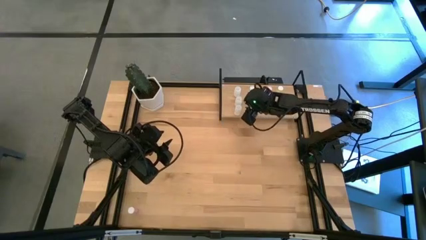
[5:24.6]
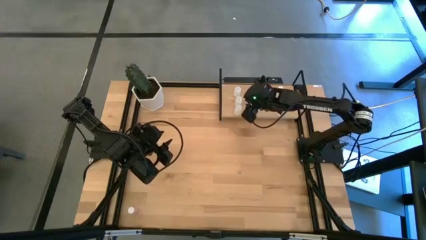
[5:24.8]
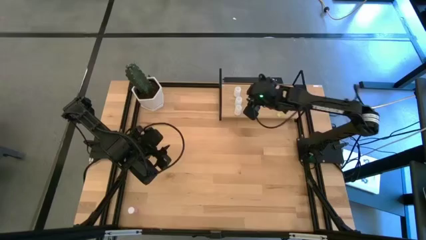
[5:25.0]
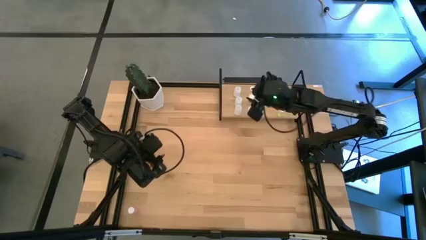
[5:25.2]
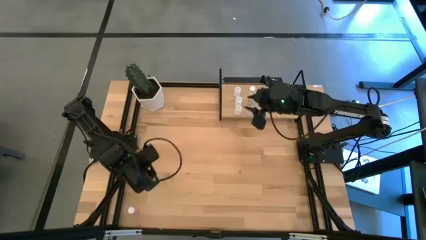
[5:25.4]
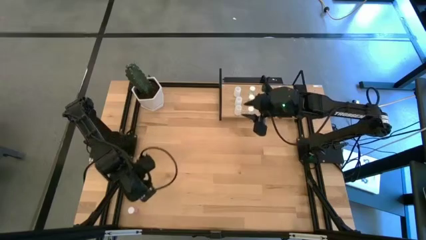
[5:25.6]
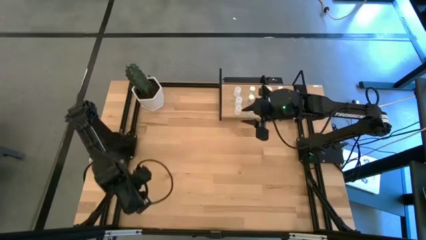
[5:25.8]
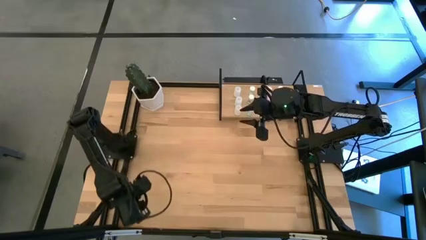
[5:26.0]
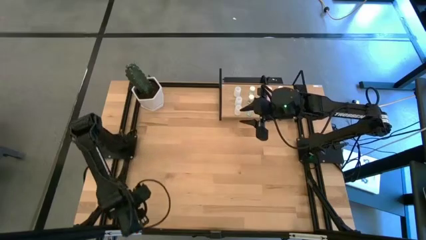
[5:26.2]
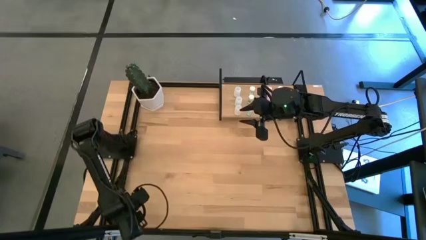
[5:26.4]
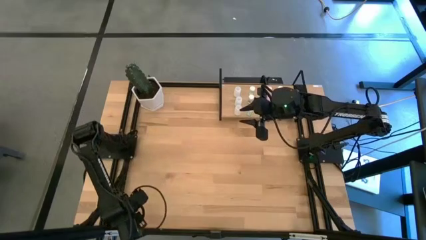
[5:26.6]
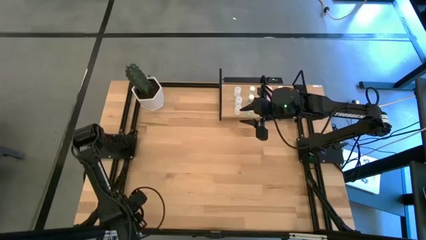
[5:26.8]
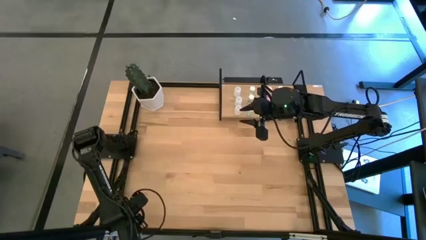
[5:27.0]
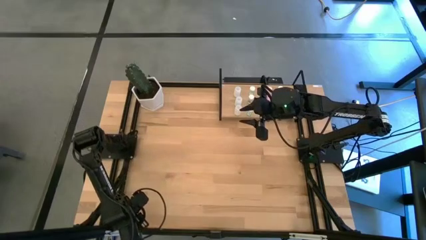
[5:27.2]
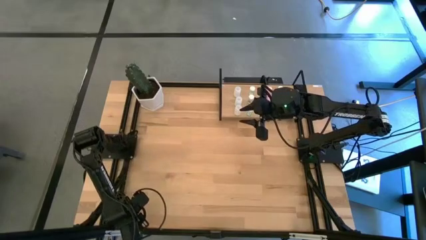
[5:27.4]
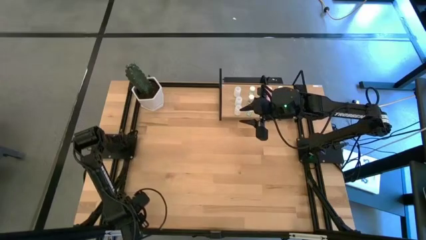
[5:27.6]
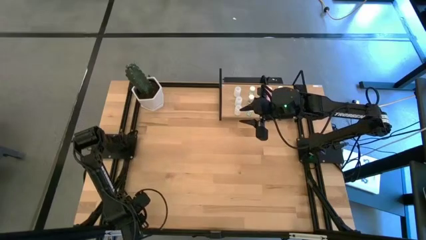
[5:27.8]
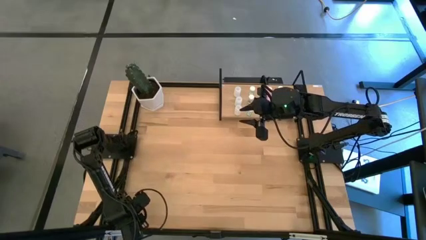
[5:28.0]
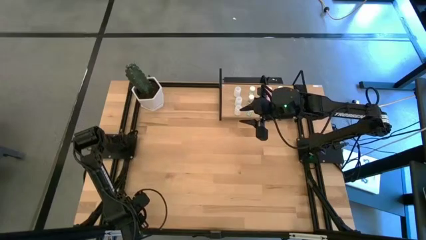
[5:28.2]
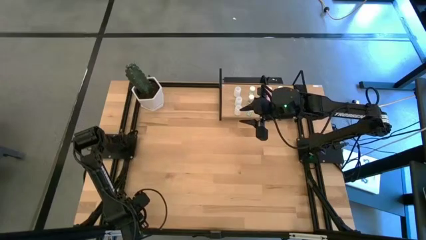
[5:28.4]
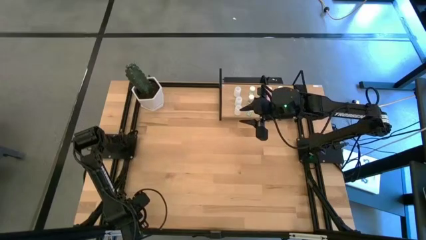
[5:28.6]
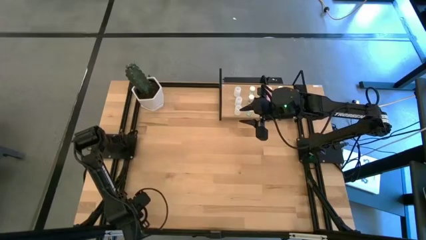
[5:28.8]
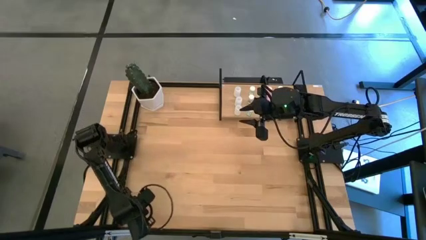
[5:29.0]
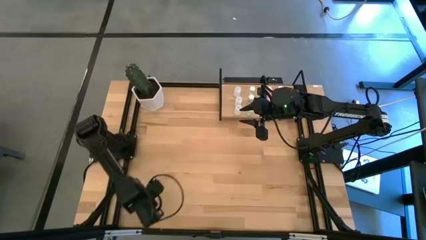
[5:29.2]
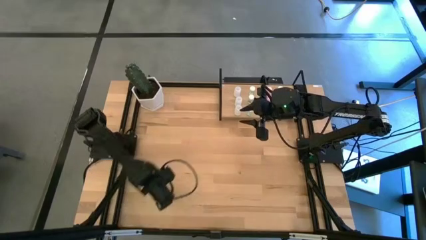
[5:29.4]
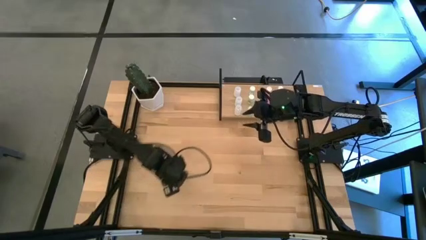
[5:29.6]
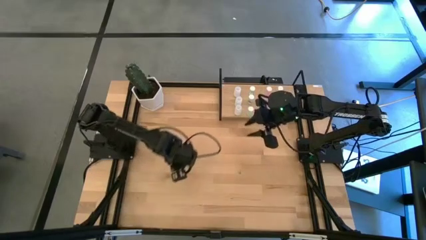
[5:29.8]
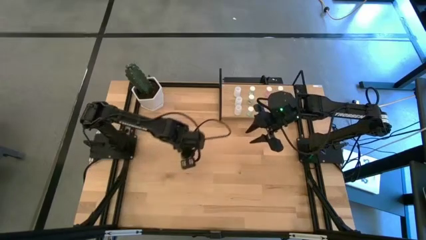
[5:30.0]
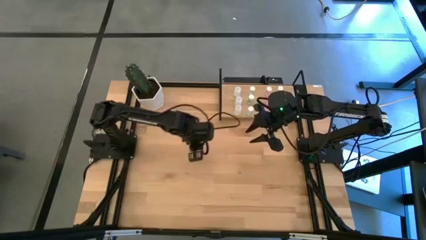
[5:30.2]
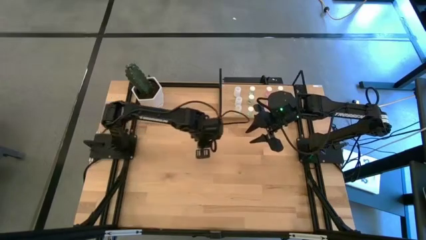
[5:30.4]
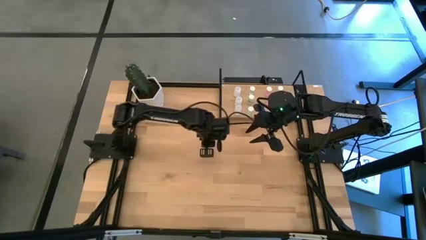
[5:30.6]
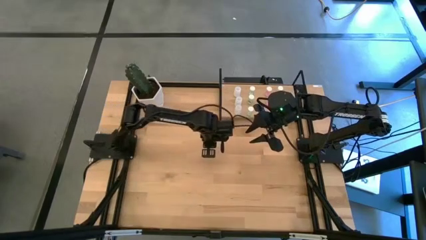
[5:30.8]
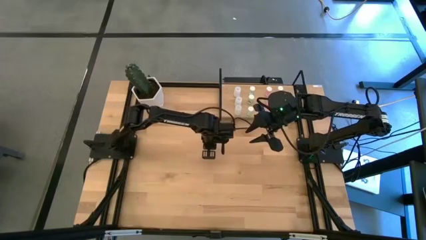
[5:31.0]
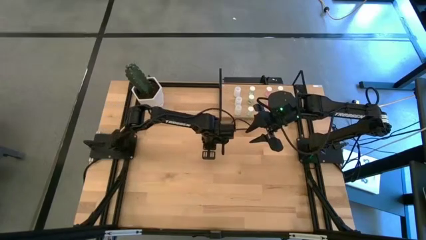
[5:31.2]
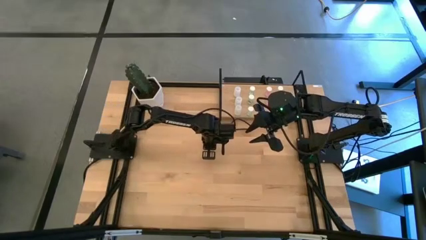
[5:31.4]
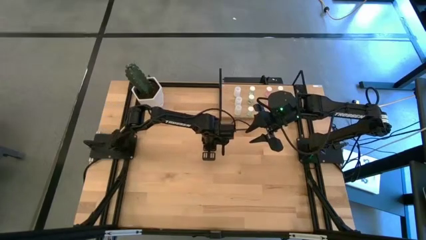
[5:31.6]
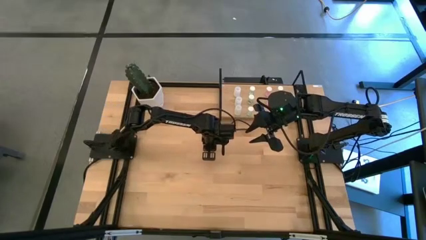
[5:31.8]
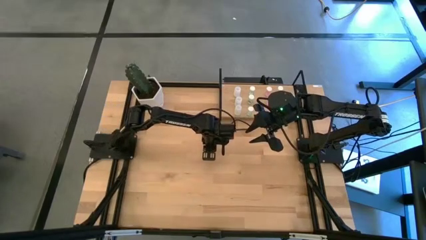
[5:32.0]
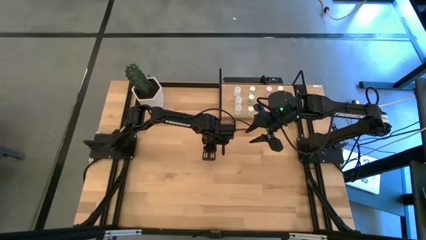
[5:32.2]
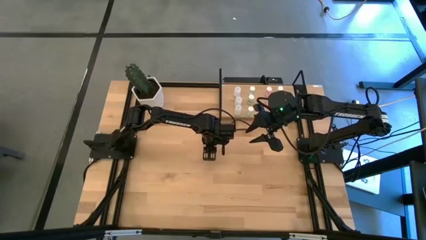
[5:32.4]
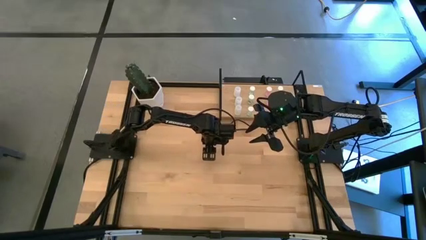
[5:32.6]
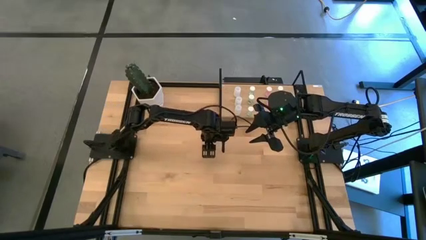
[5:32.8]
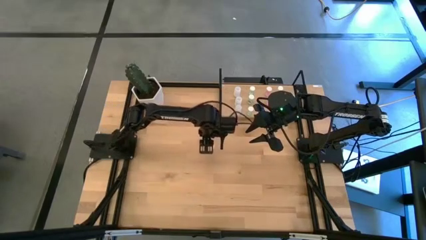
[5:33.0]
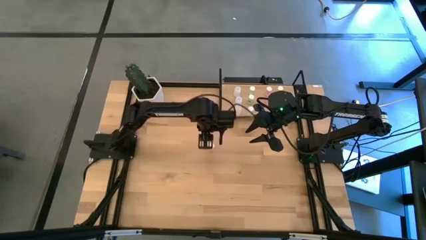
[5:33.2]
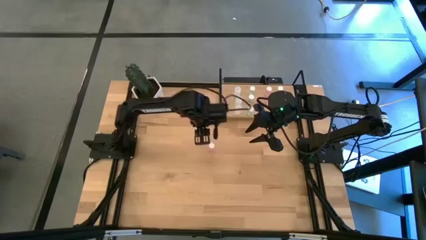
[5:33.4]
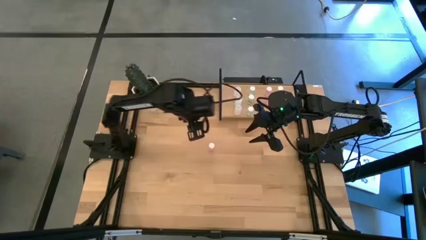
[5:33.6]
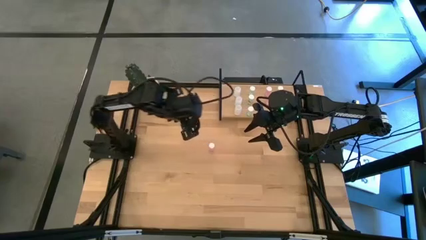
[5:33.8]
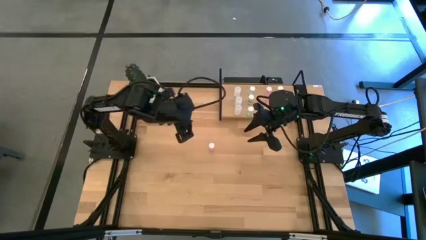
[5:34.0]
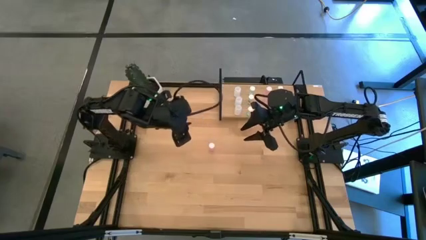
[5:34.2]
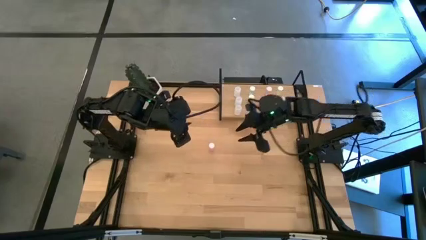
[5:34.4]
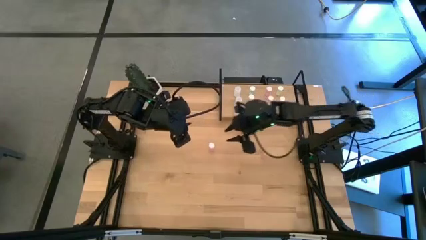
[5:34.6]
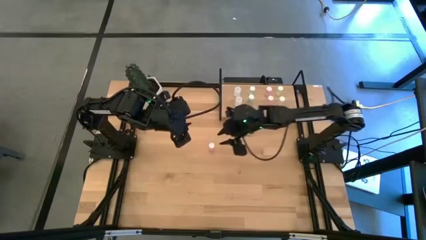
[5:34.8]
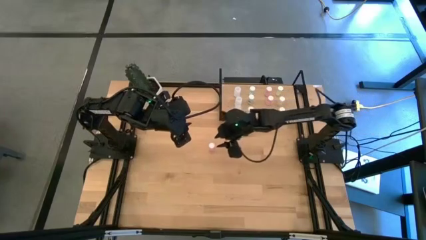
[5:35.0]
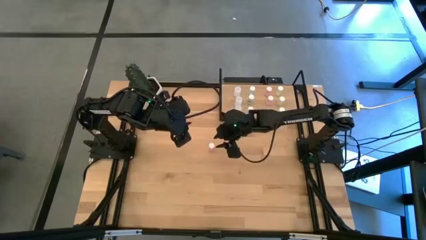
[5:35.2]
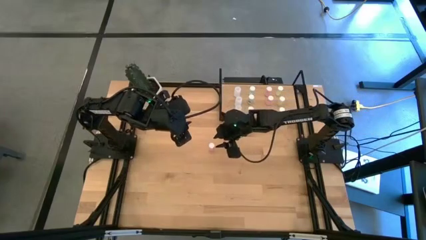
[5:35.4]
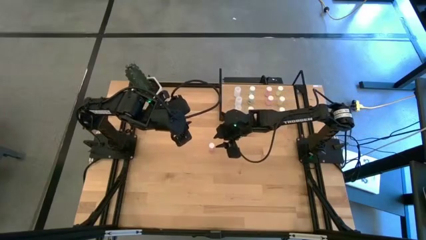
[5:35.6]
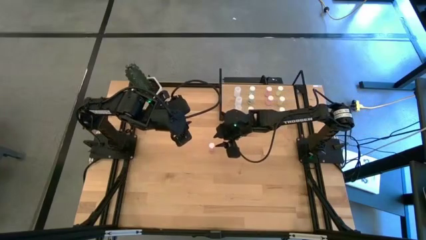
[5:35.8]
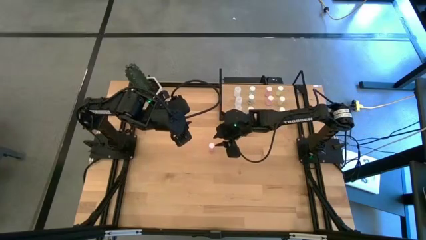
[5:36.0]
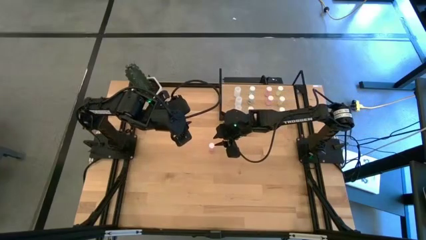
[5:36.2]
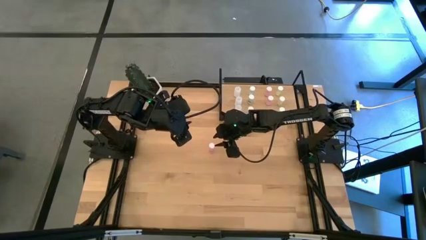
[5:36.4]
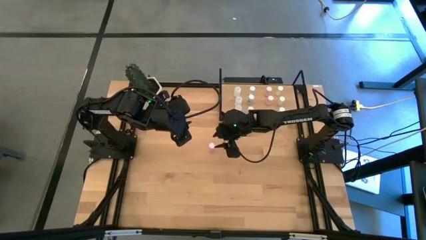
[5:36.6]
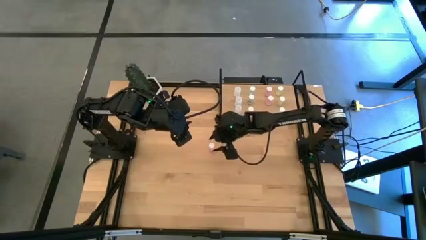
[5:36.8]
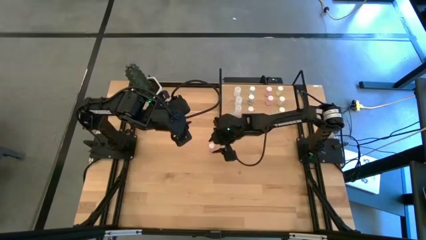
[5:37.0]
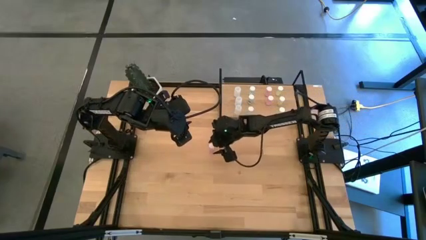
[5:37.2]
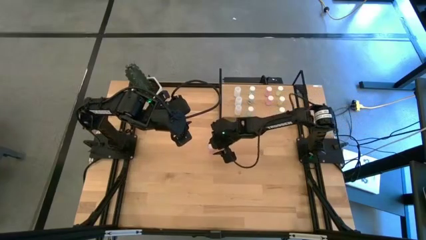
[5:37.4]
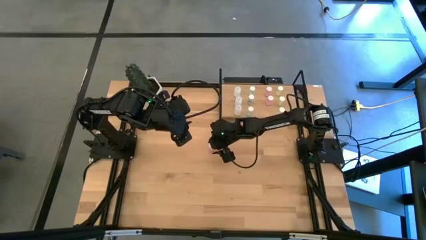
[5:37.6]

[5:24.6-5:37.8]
Task: Pick and place medicine bottles onto shelf by color
Put the pink pill bottle on the shelf aligned with the other pink pill bottles

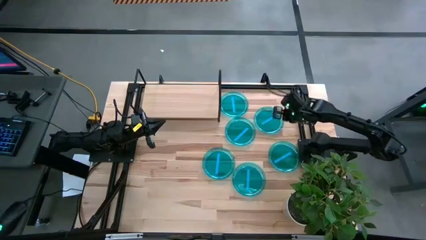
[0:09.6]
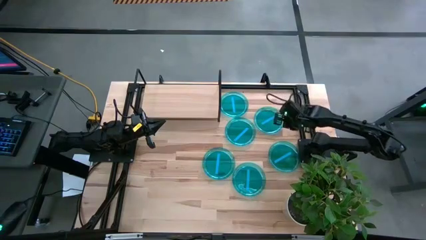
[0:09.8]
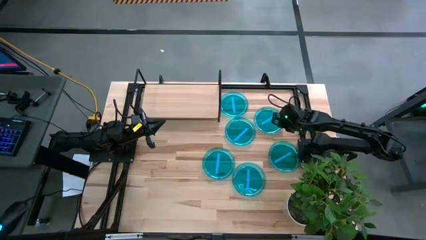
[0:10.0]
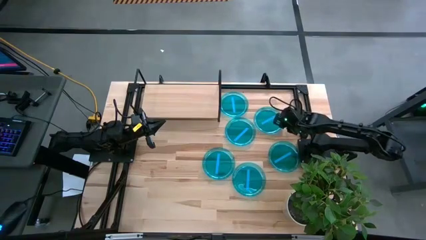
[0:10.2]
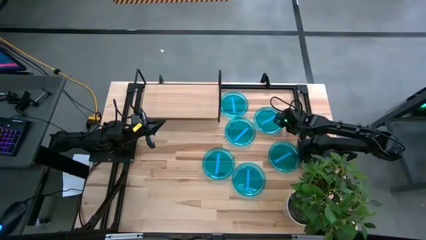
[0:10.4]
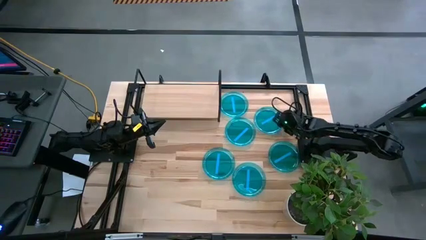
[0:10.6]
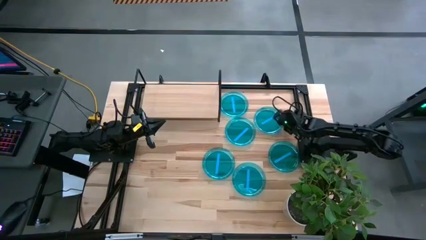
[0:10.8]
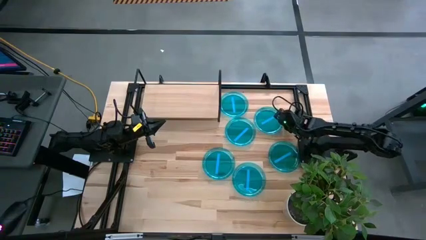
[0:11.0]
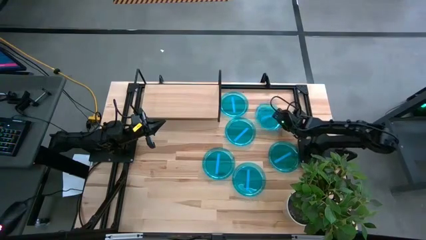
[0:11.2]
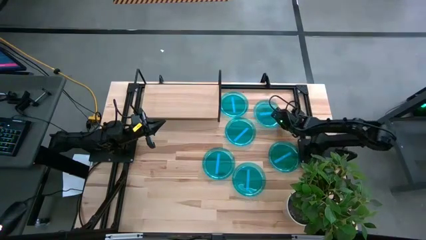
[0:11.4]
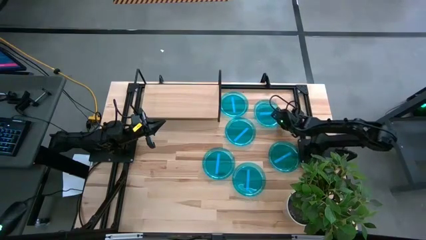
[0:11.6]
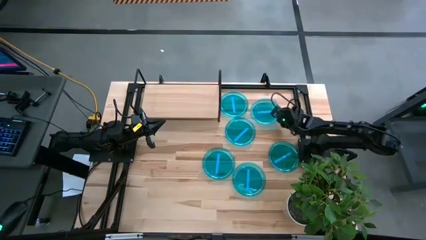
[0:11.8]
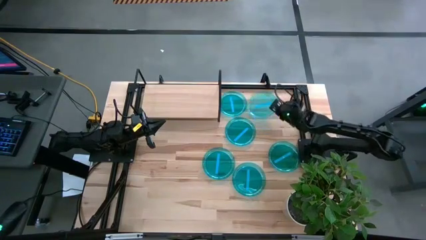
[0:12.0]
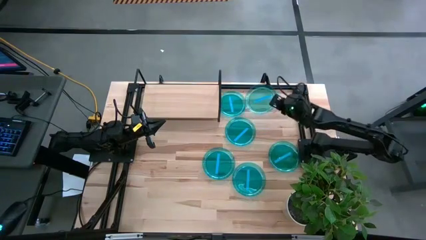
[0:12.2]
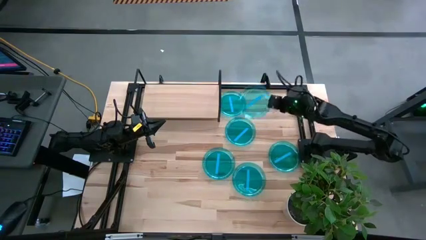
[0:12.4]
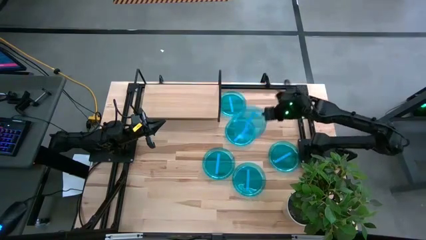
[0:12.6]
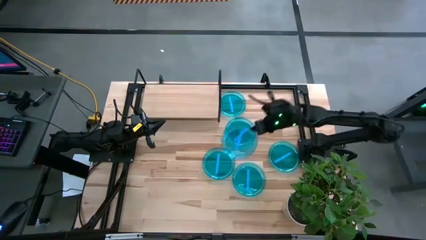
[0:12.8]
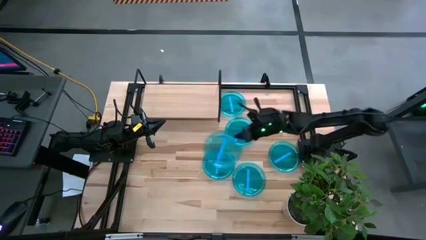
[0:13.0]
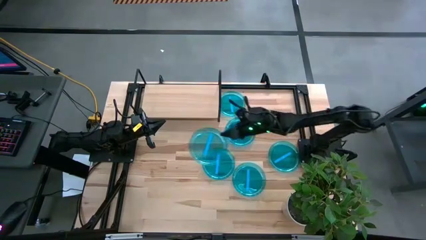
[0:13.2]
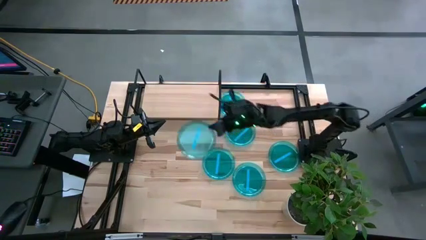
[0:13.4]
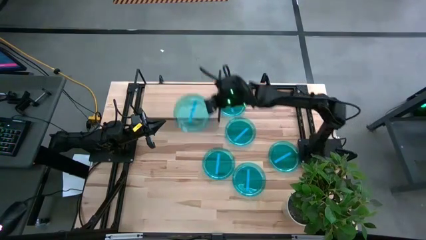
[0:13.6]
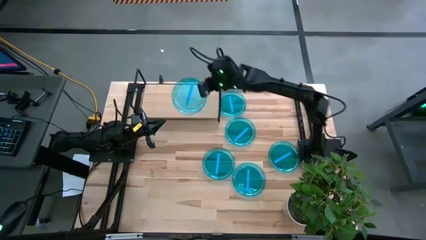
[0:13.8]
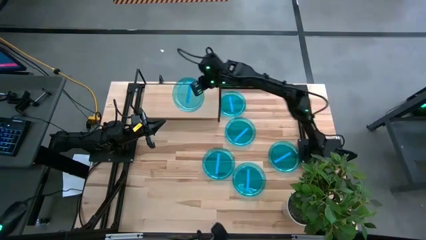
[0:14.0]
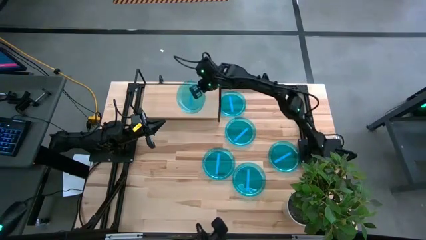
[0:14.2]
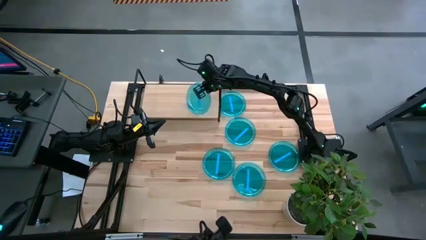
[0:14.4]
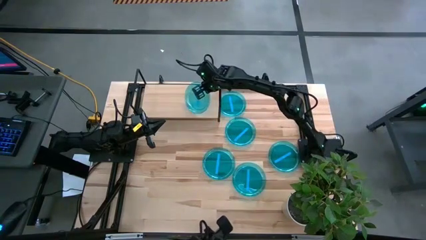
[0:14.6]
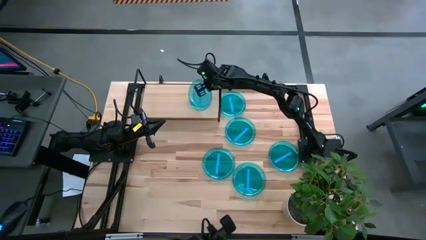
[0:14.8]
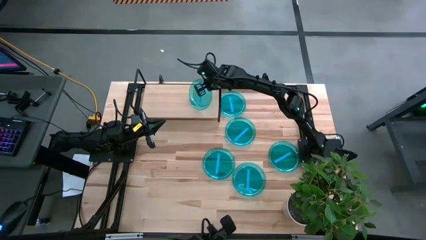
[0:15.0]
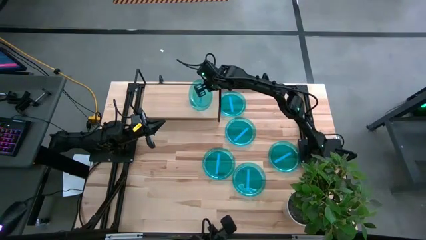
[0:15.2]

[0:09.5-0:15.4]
Task: Place and stack plates onto a shelf
Put the blue plate on the shelf
